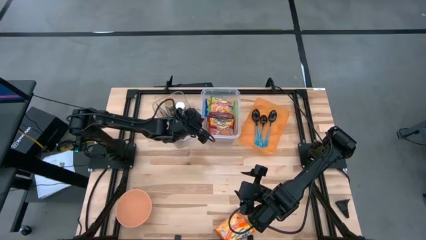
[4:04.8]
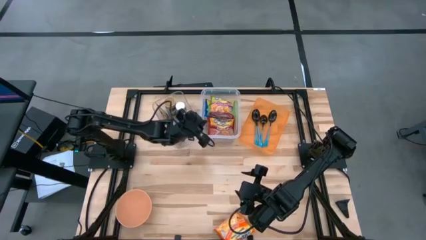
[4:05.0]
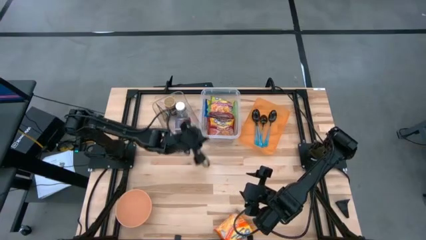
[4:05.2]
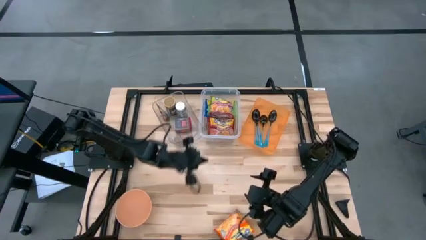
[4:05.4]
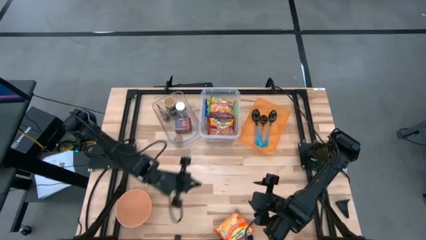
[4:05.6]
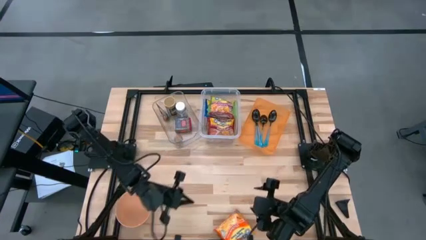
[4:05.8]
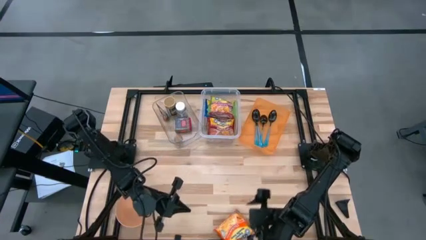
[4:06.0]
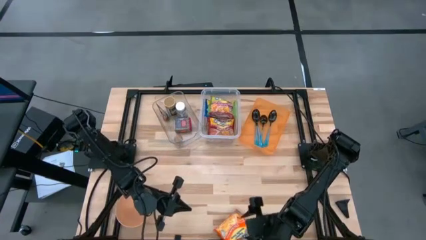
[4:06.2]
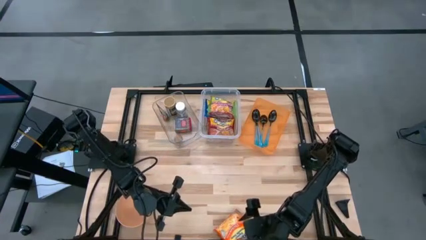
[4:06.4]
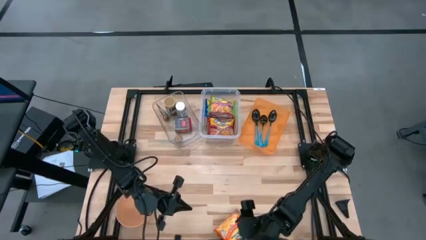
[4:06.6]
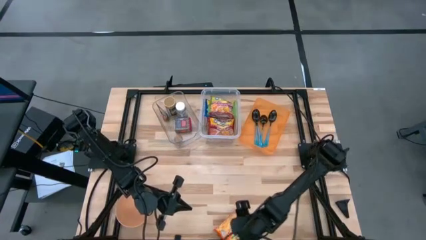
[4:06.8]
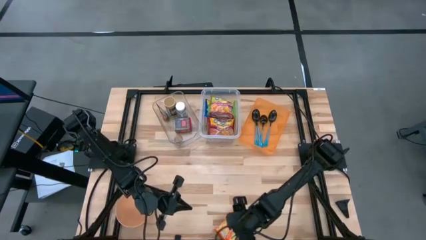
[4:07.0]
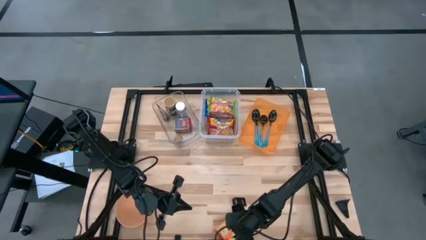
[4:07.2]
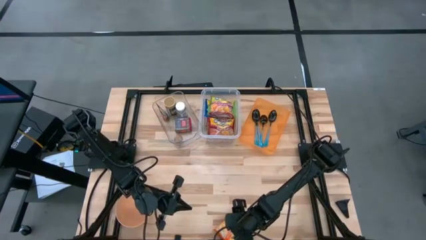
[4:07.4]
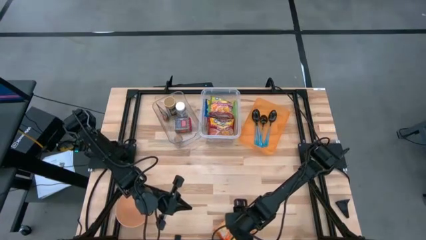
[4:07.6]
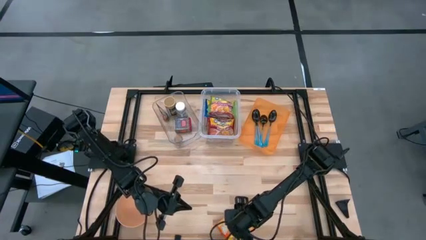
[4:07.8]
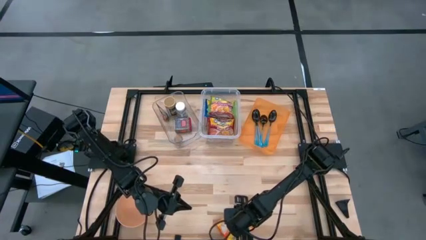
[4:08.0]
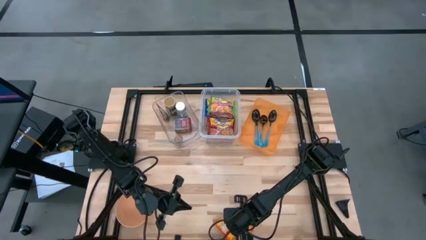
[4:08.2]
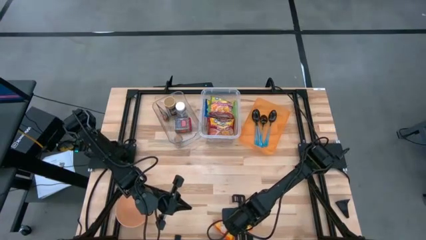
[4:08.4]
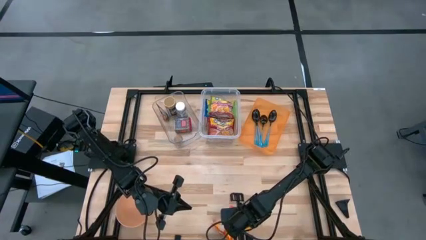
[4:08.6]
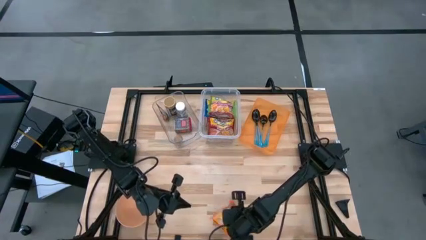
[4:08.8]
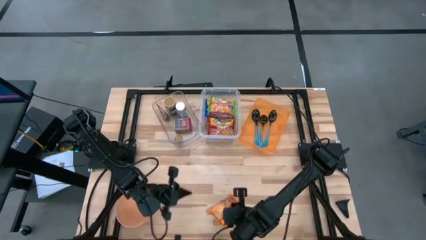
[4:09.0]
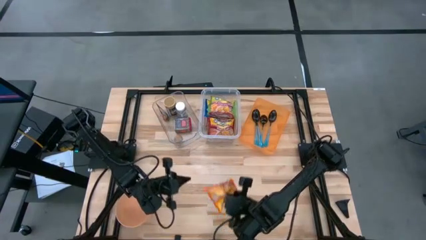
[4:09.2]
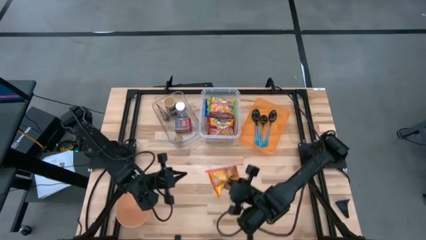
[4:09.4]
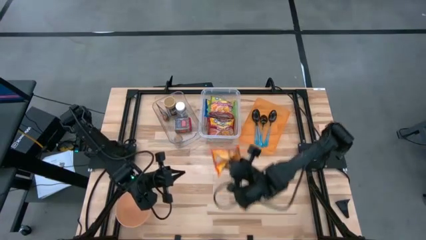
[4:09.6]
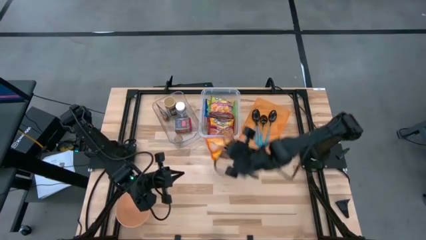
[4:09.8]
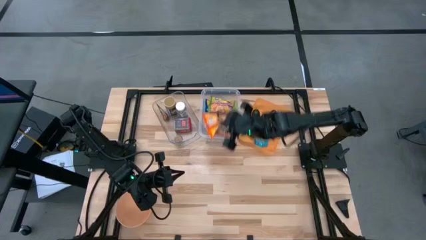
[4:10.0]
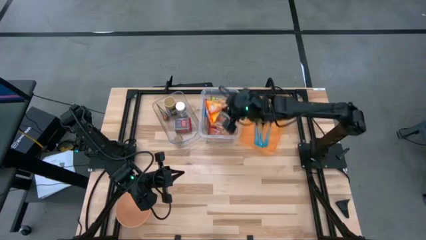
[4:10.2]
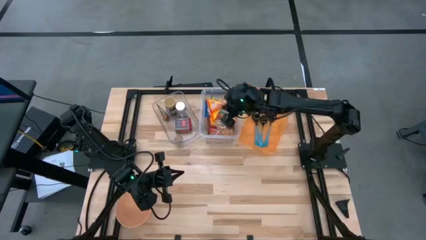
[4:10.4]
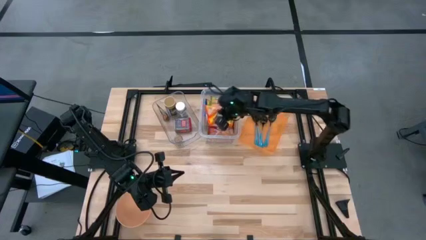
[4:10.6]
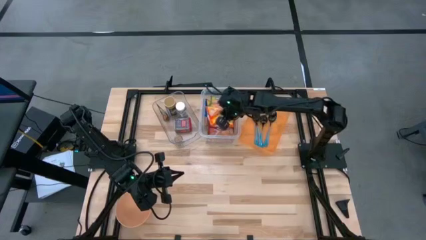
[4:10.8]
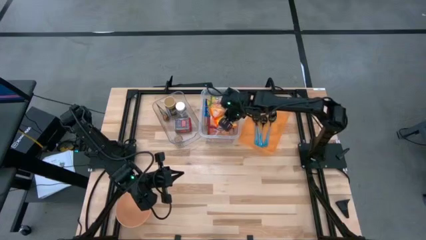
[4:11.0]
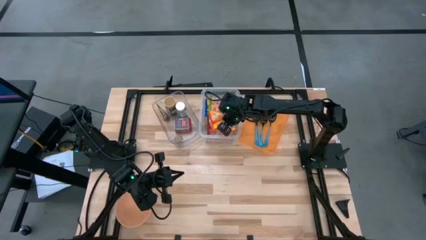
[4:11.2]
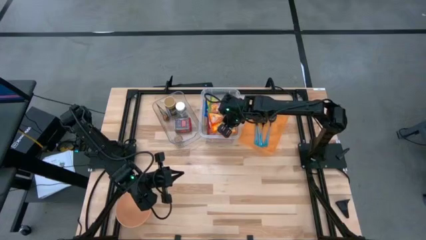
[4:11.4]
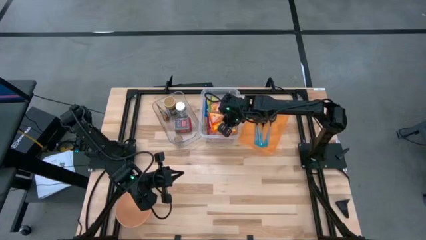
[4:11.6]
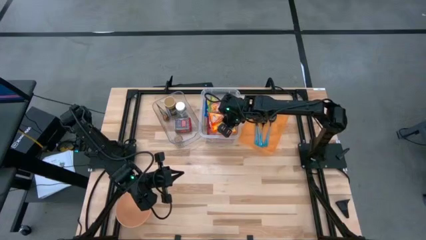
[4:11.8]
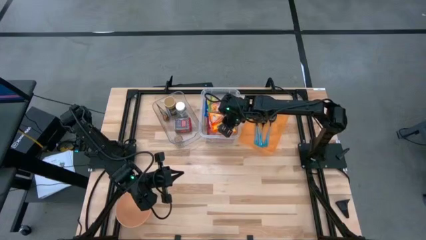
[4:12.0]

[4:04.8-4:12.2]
Task: Pick & Place Food Item
Put the orange noodle pack into the white bin

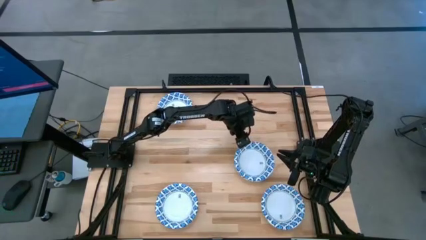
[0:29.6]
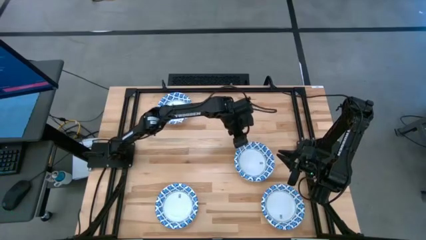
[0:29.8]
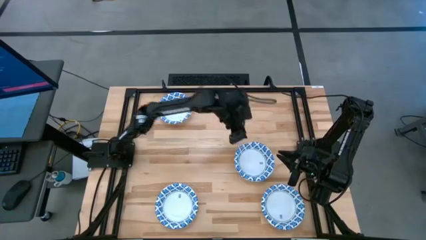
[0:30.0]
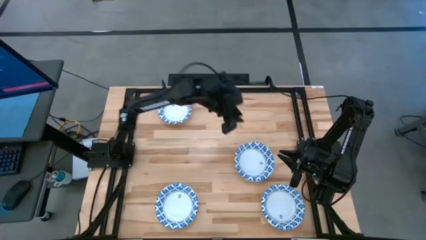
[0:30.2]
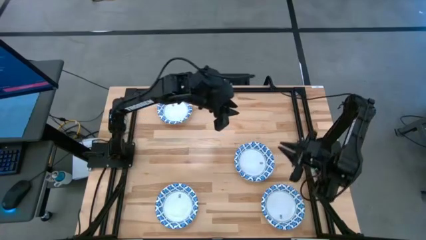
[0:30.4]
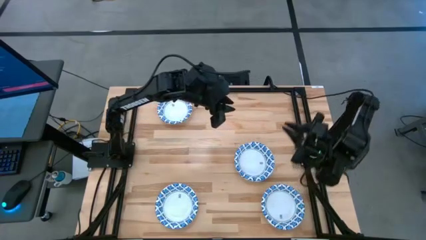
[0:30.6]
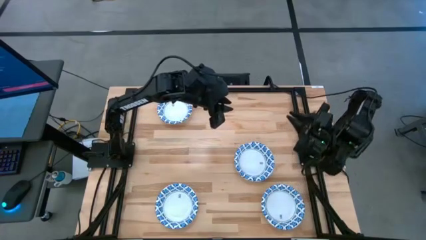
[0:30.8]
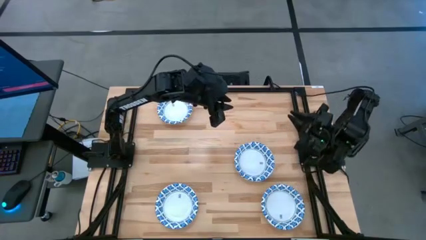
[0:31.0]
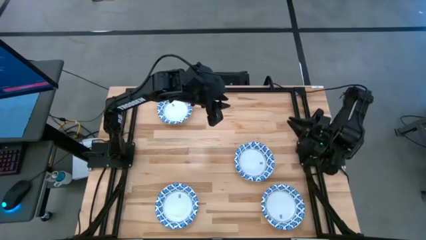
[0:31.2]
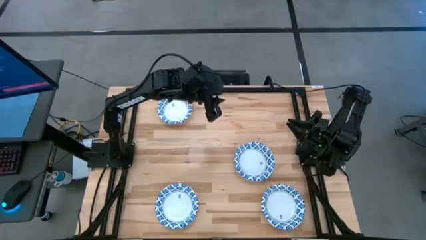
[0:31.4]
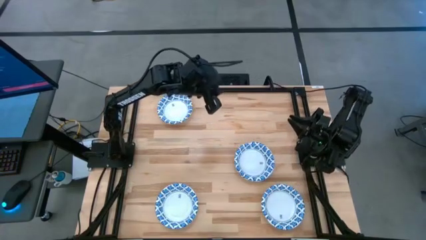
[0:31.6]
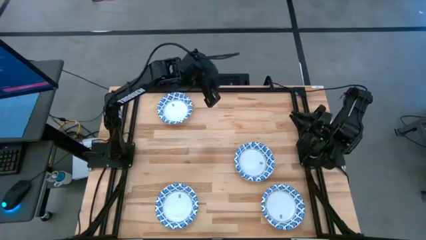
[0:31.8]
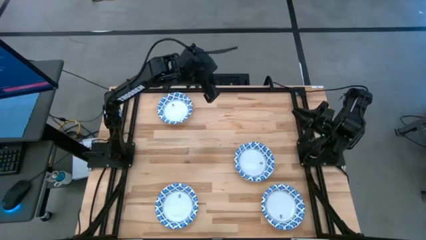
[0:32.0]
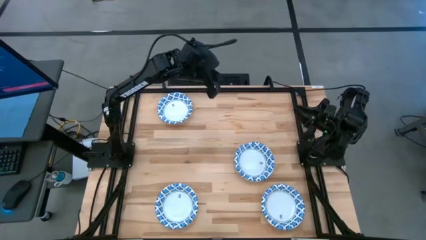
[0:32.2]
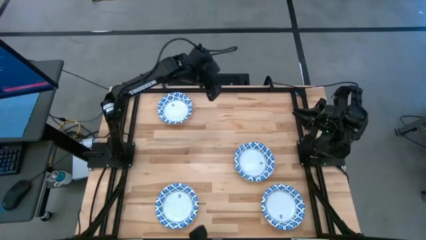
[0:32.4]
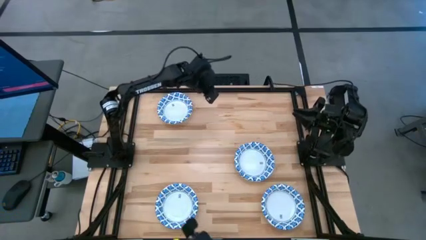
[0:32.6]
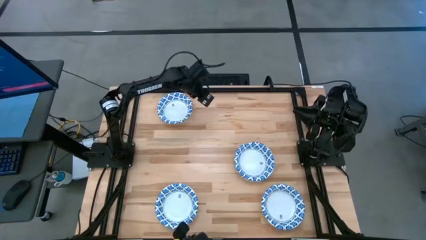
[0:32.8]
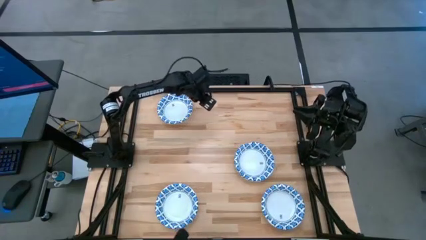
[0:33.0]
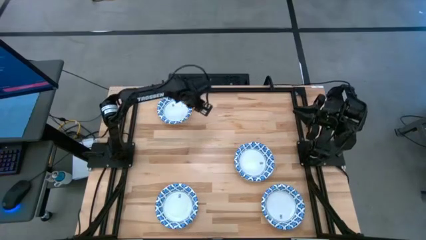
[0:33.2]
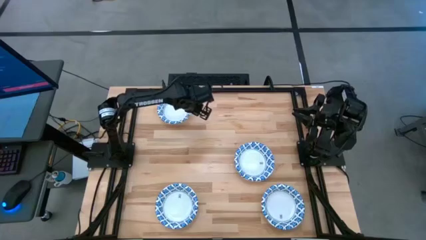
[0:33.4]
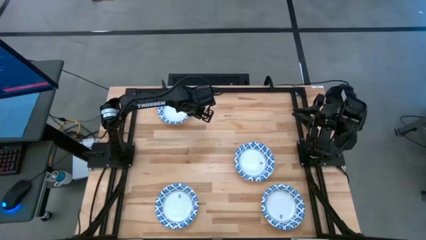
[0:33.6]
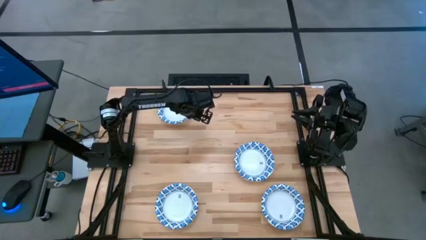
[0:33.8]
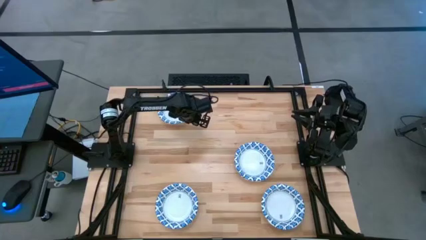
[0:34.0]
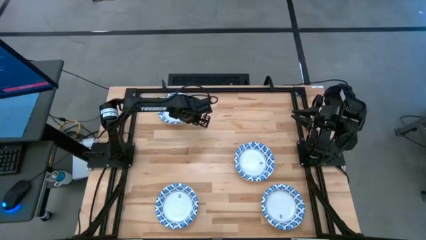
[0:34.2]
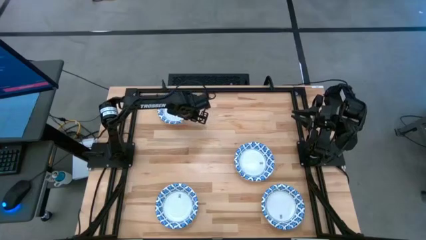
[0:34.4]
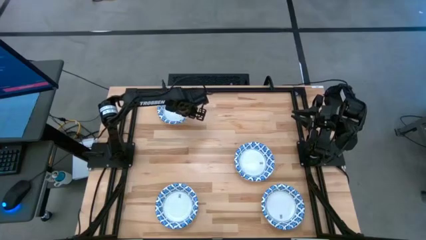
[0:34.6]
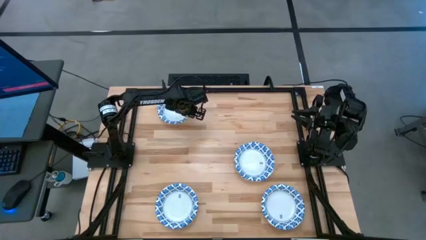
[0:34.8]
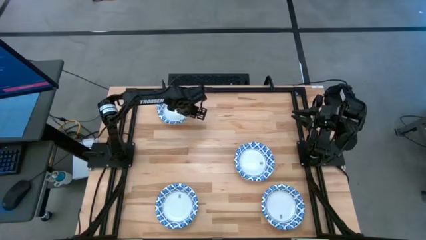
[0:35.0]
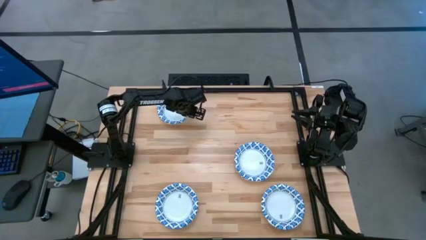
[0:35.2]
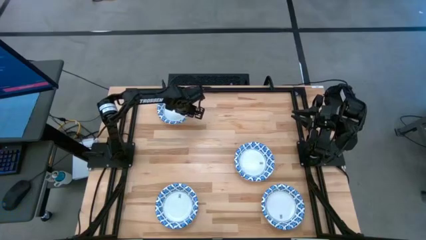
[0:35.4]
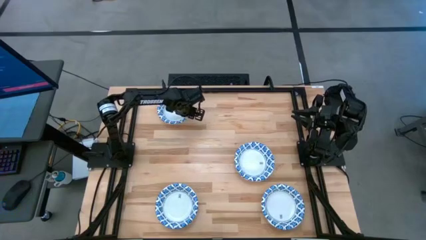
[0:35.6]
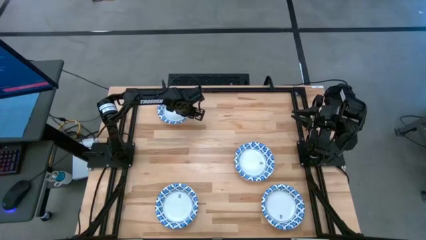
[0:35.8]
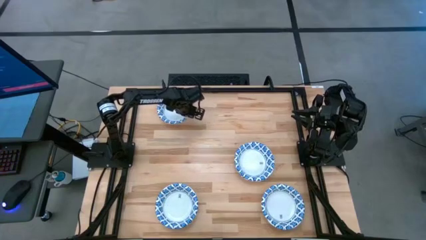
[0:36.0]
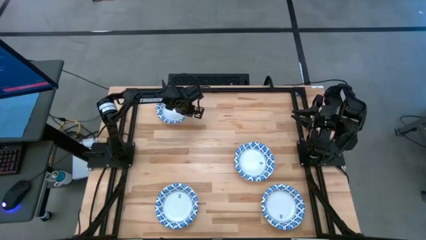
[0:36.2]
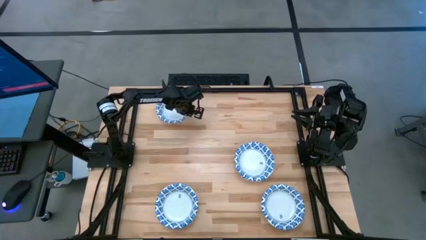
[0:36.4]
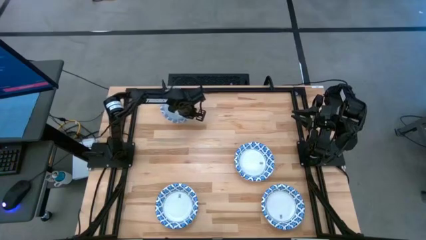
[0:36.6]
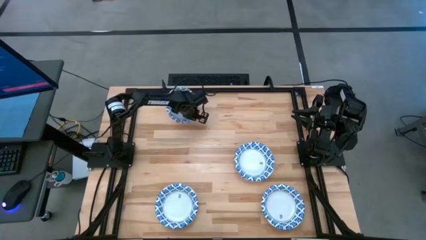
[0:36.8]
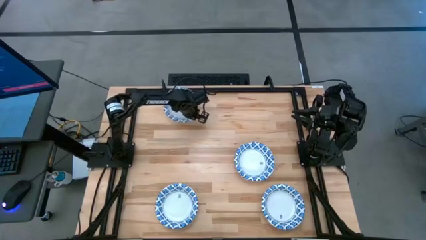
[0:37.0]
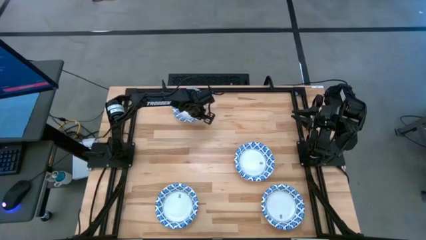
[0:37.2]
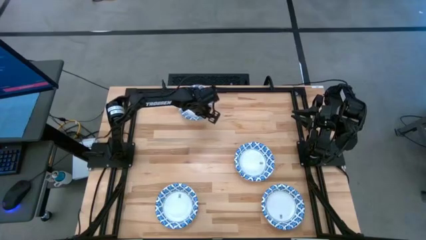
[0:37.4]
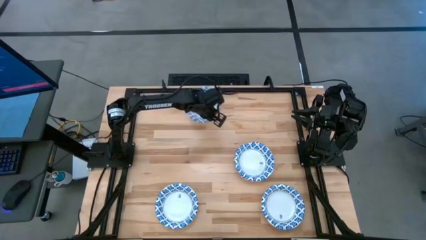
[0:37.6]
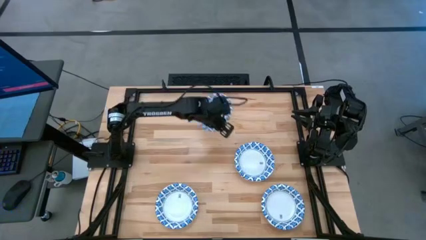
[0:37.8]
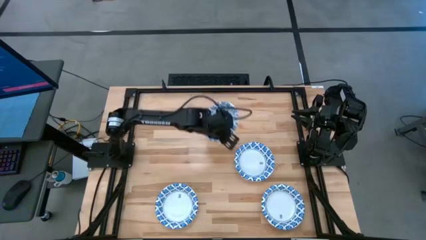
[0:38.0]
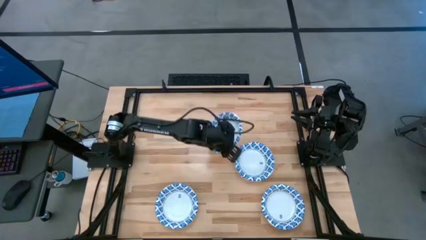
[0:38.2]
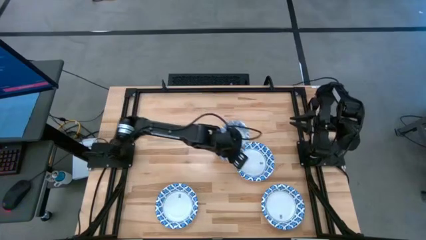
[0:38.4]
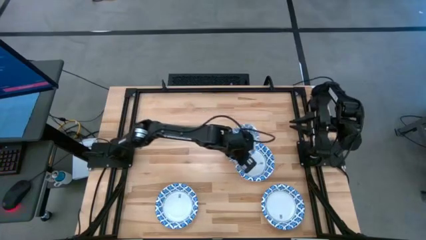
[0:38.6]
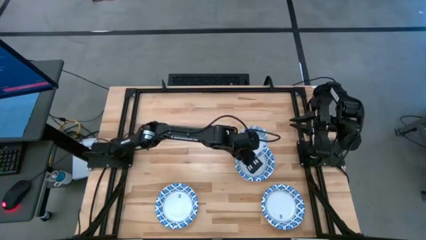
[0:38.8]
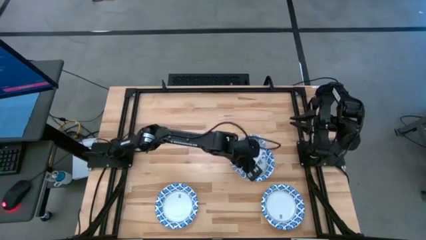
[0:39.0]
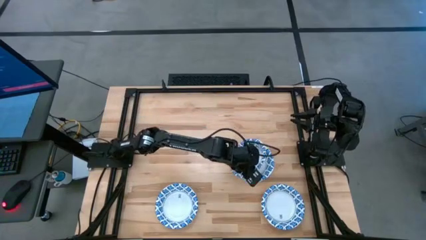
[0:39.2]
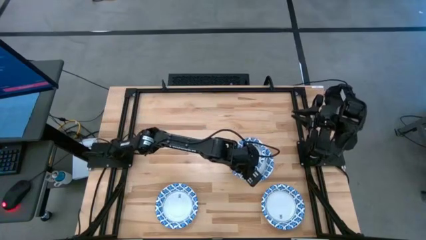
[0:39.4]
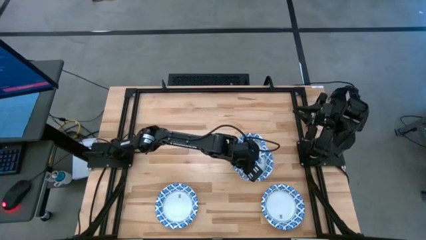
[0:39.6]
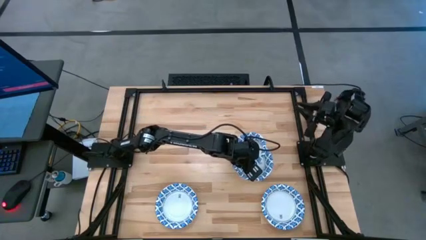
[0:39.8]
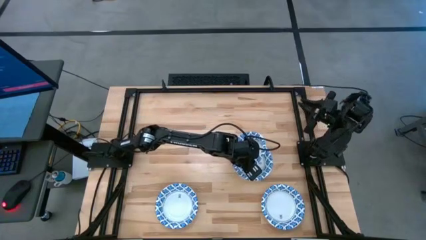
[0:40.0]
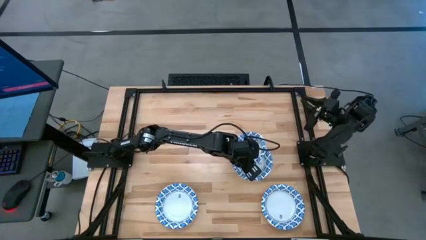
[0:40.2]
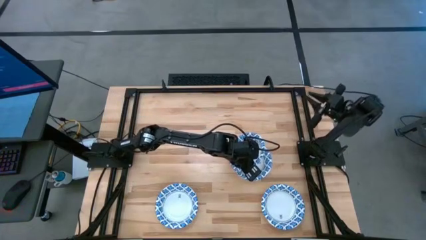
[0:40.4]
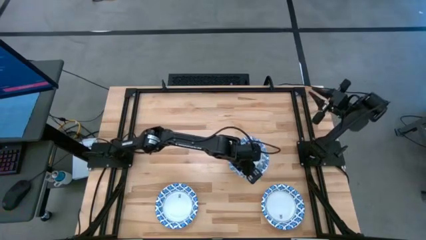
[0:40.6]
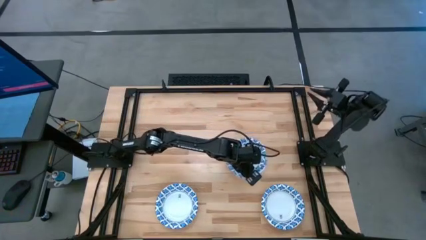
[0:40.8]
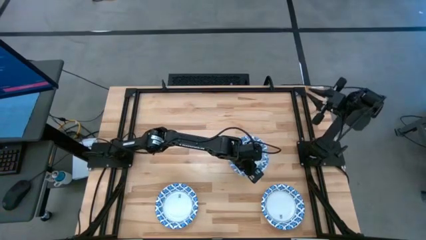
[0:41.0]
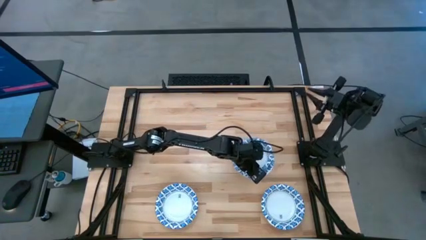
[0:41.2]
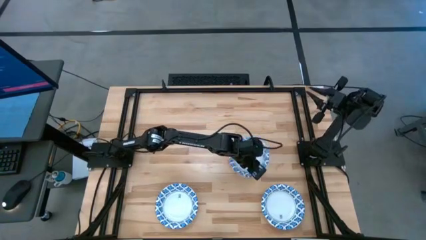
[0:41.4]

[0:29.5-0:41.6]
Task: Nest bowls inside each other
Stack the white bowl on top of the other white bowl
